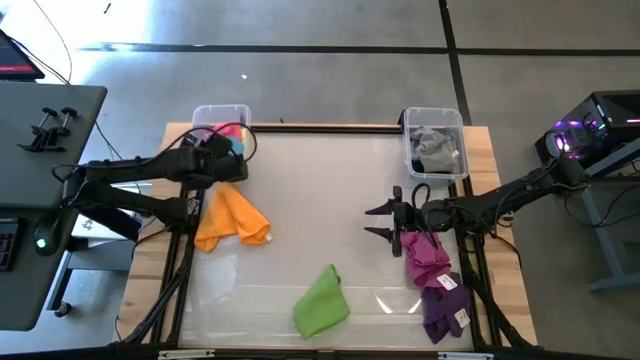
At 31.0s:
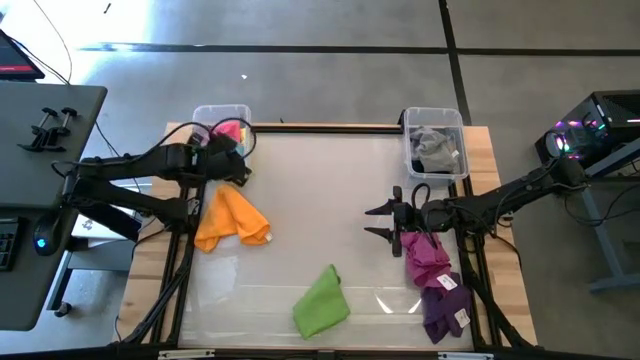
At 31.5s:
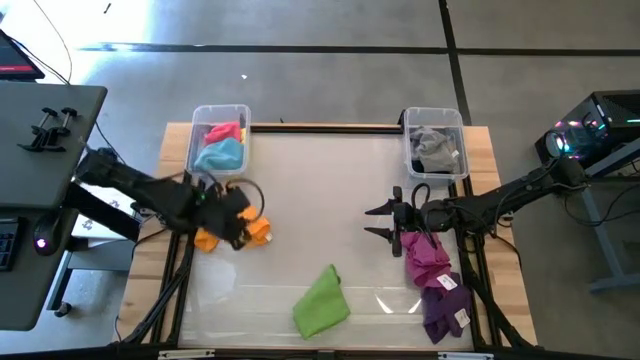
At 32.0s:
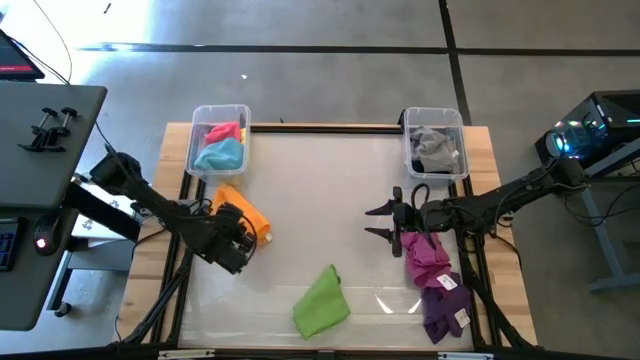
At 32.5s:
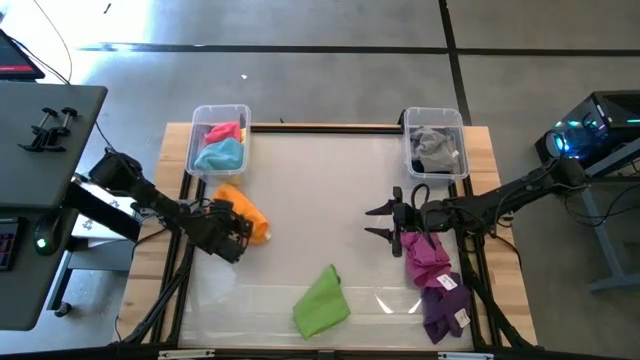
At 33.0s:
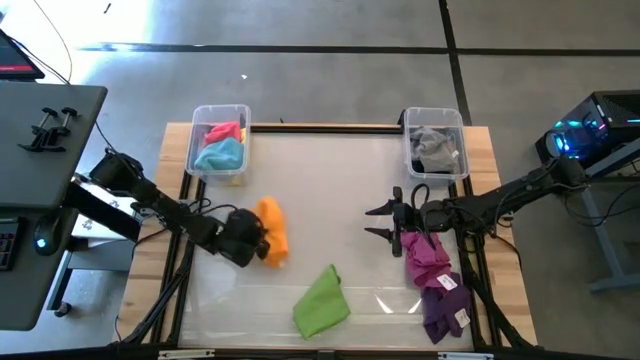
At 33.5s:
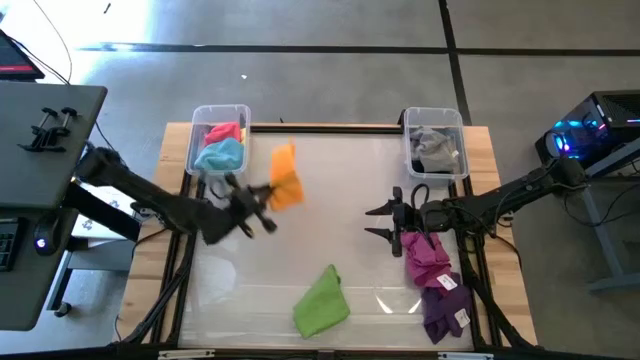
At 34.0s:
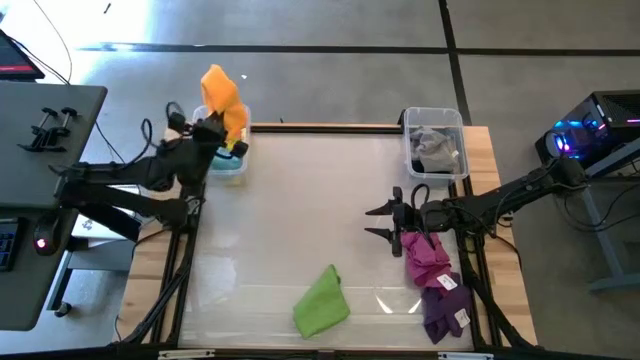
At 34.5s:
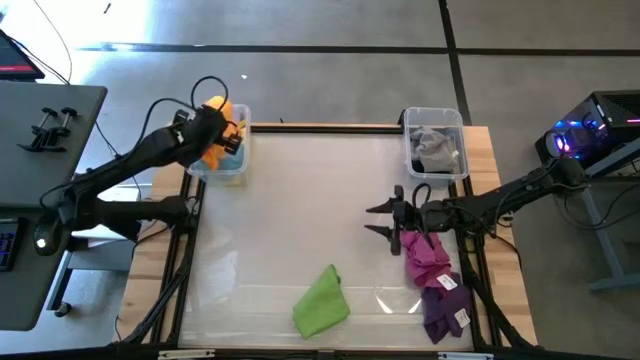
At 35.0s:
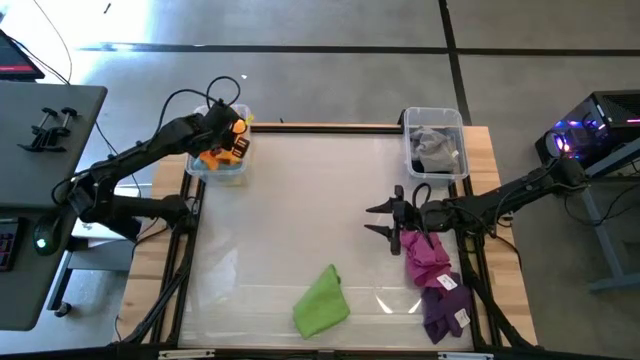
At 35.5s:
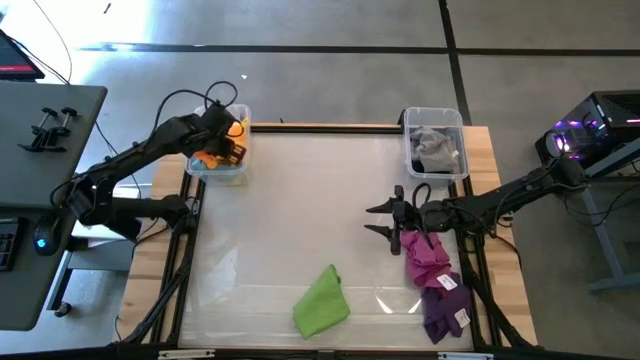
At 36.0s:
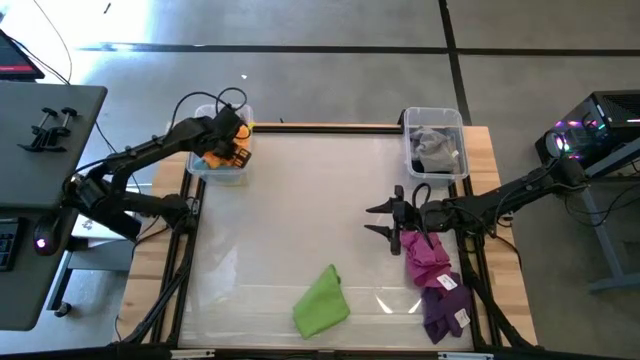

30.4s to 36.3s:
Task: Sort towels by color in basket
Put the orange towel into the left transparent bin

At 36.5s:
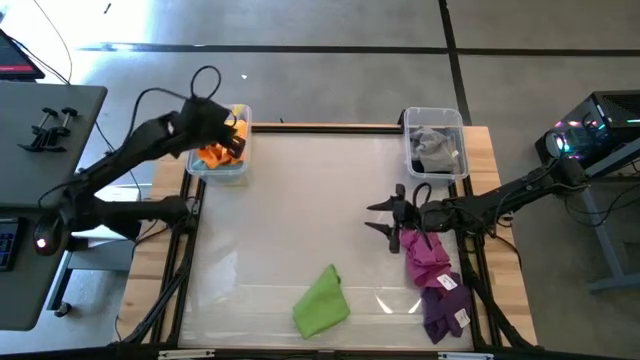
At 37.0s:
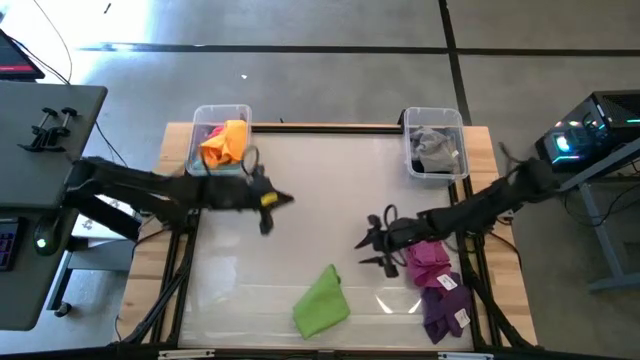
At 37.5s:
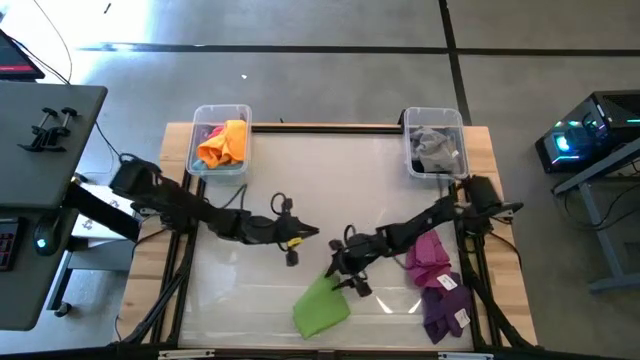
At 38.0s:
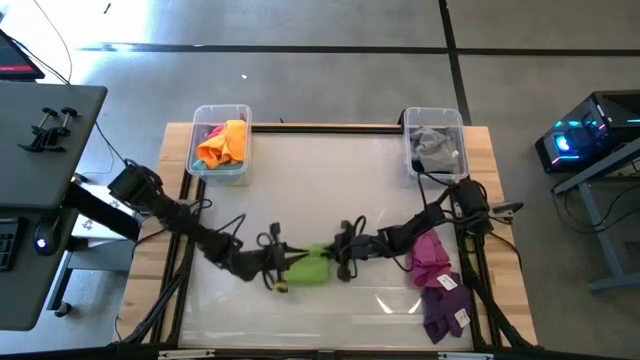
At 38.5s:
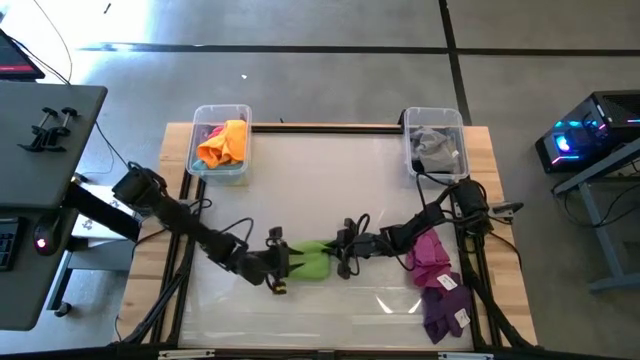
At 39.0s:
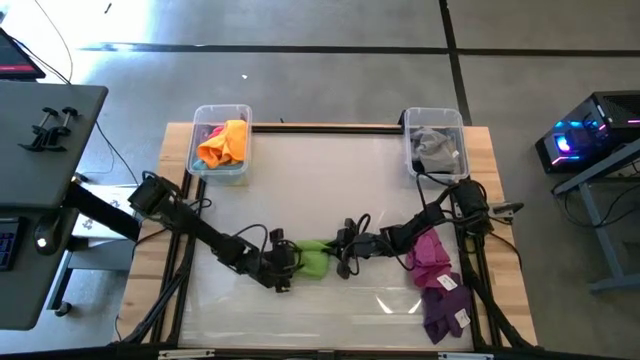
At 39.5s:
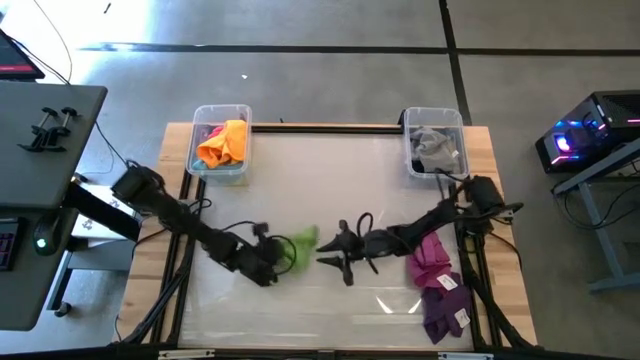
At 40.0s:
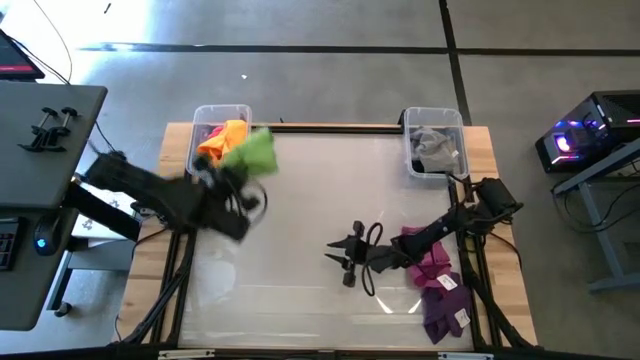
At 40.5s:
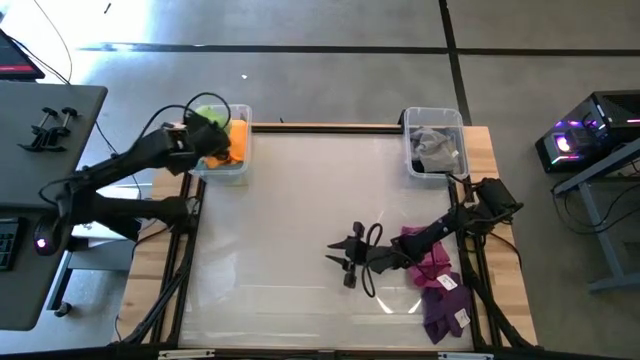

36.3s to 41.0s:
Put the light green towel into the left transparent bin

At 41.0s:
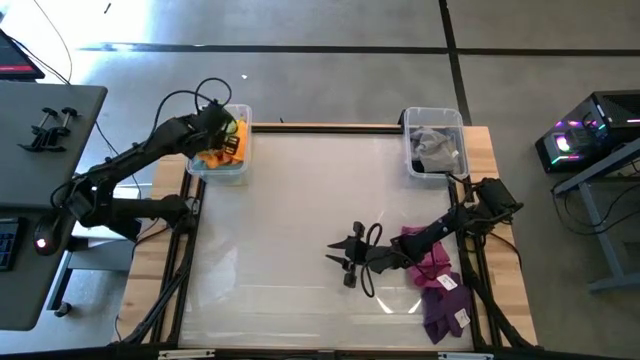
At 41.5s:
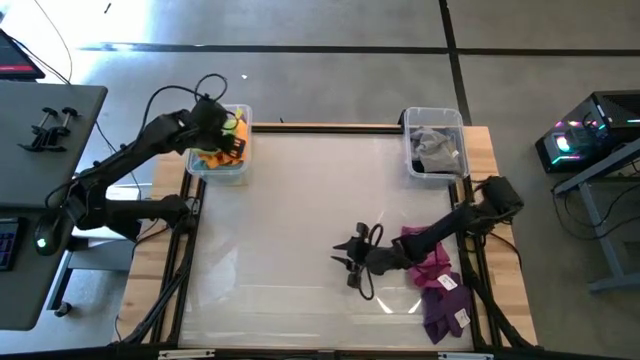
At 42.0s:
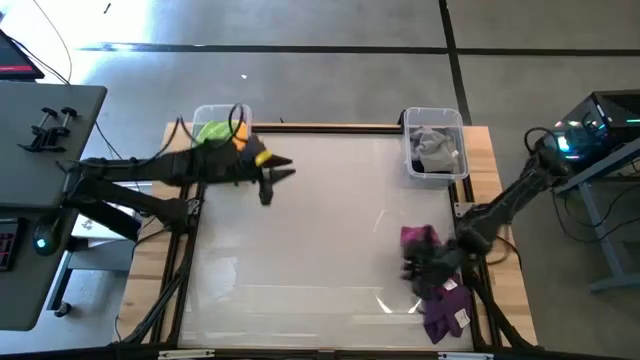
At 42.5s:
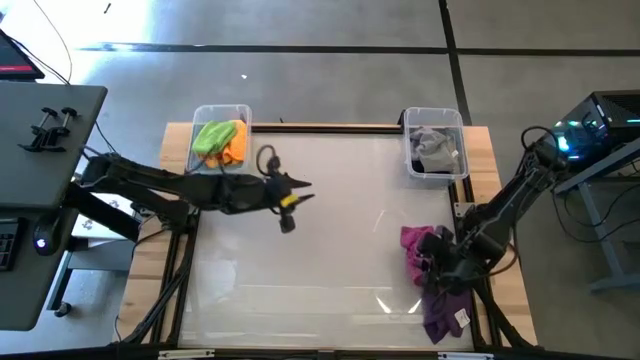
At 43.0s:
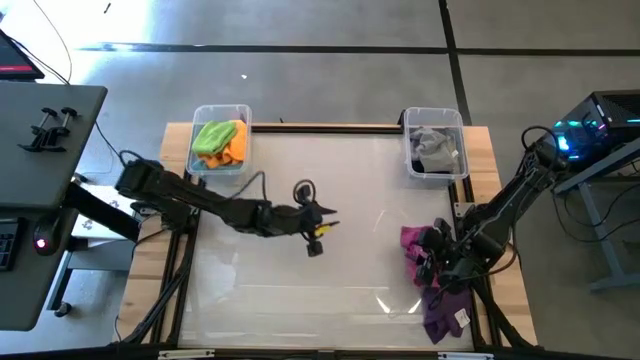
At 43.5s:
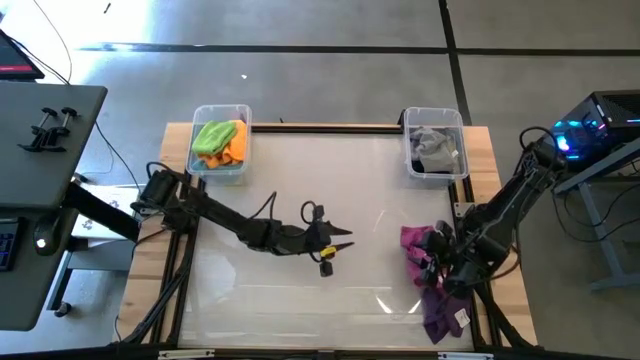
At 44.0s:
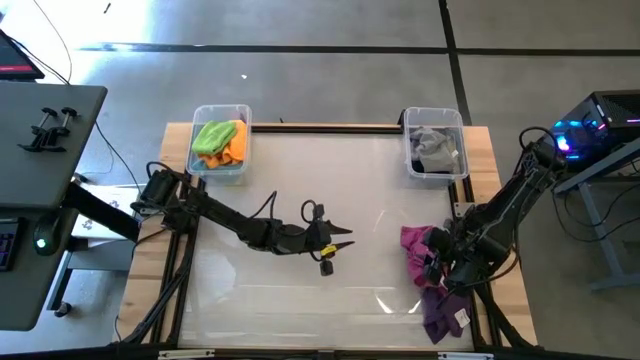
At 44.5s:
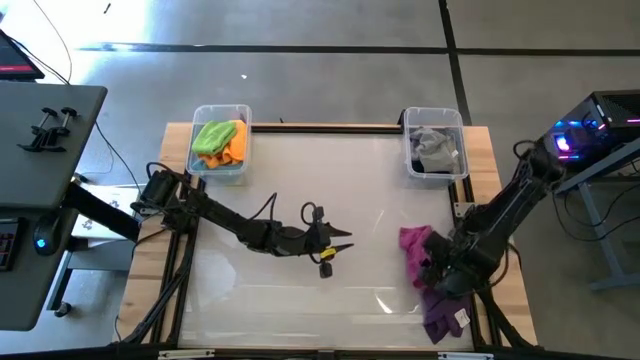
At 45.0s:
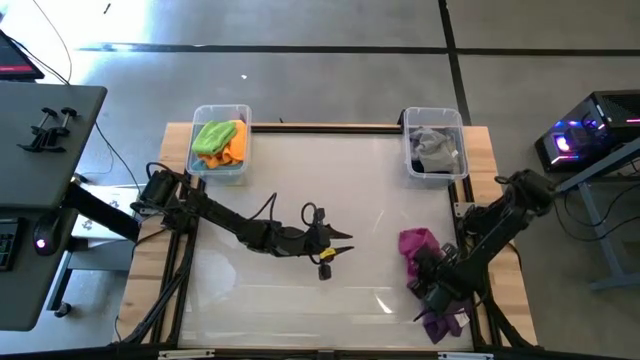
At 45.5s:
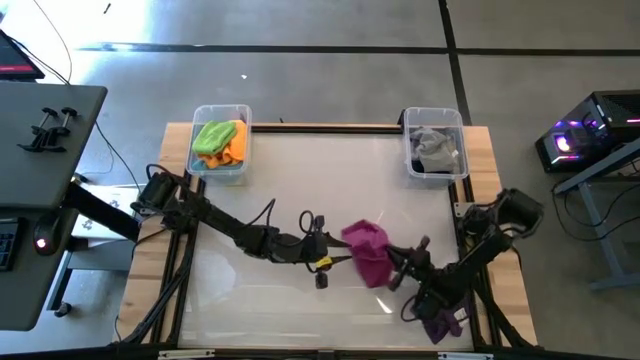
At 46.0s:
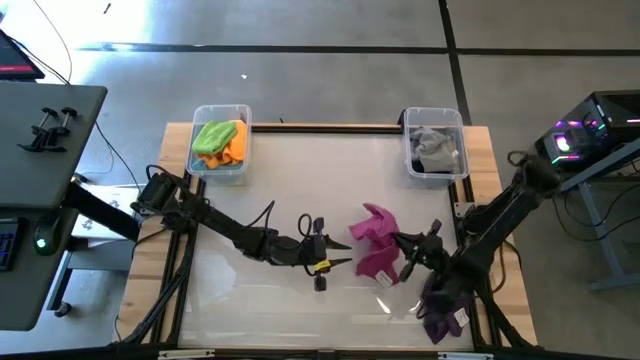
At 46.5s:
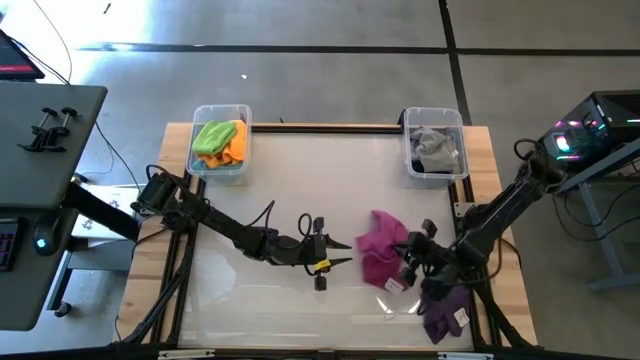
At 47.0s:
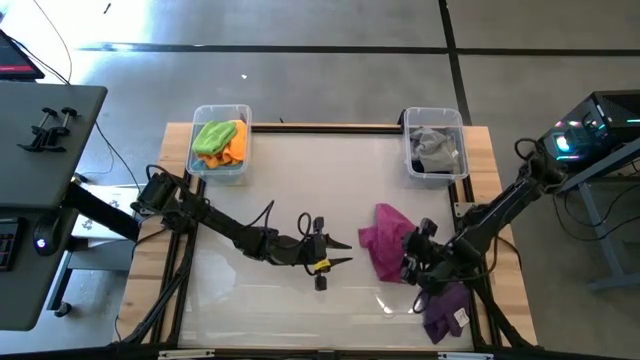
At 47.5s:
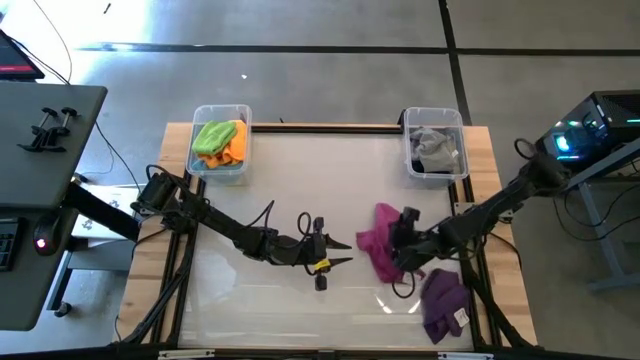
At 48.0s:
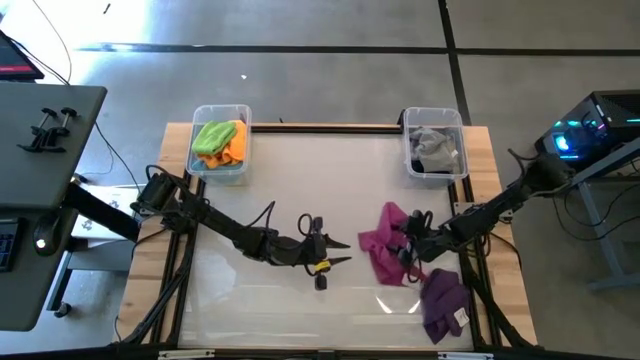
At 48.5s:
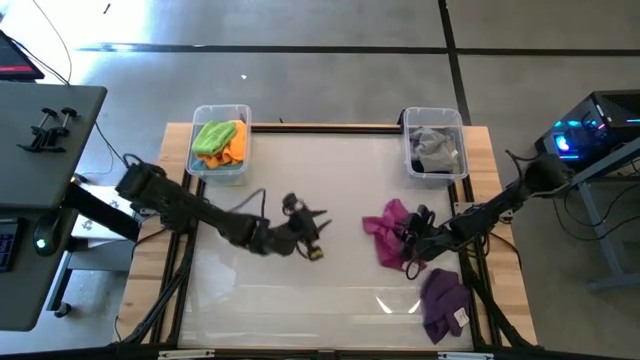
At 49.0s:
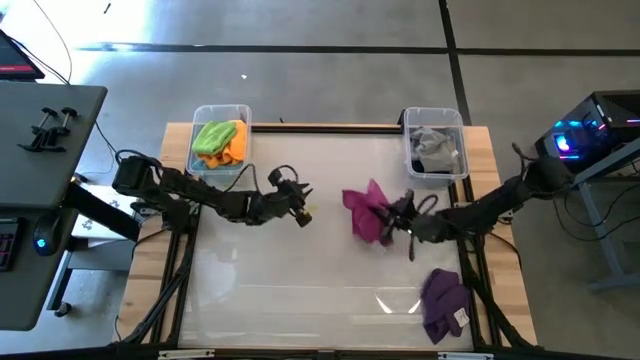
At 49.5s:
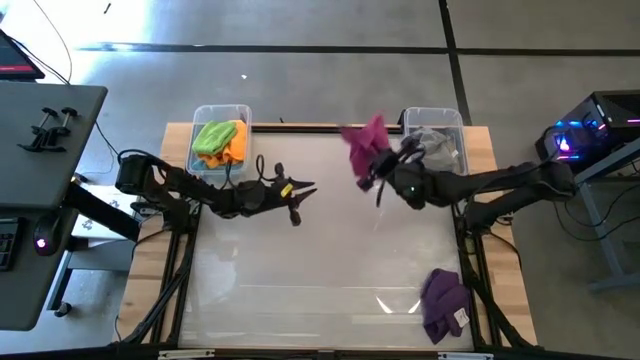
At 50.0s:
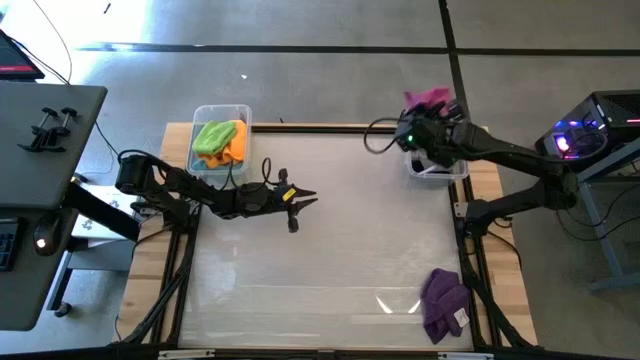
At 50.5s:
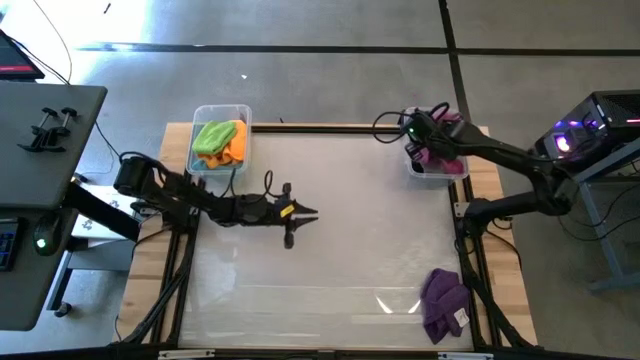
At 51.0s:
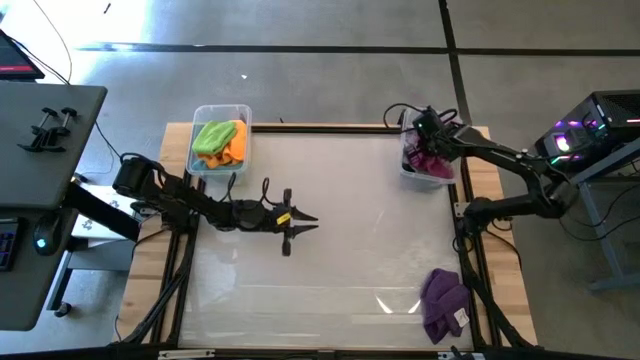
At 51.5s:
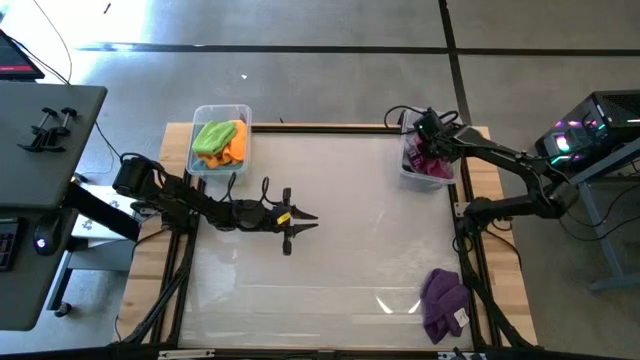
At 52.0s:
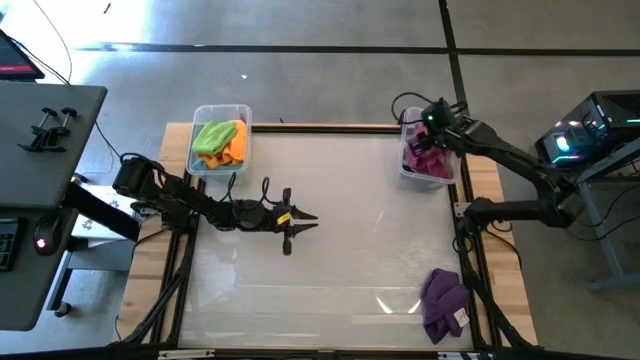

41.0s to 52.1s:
Put the maroon towel into the right transparent bin
